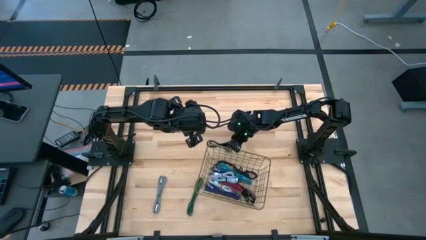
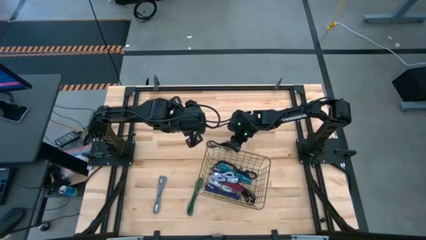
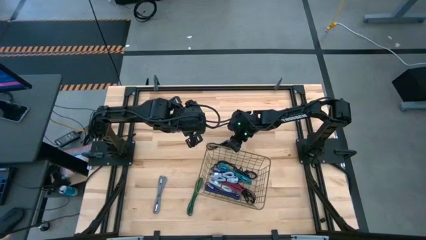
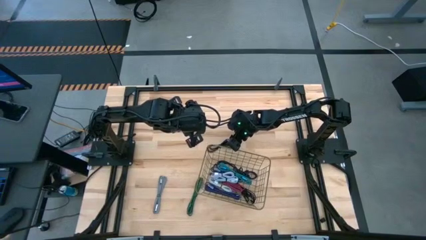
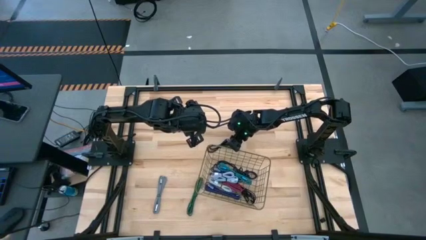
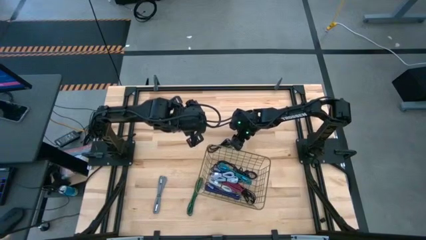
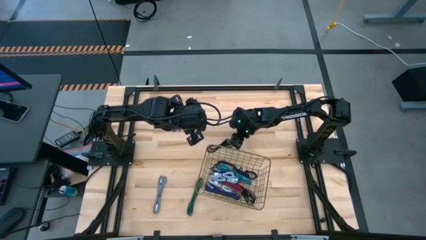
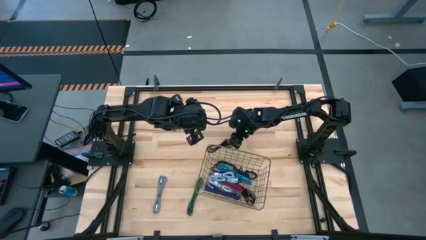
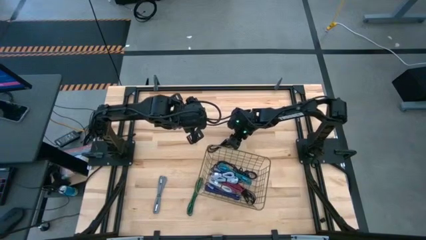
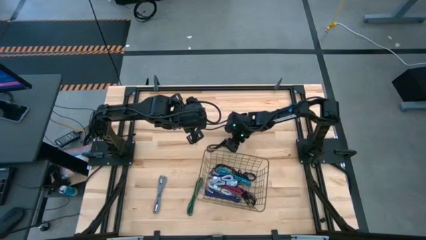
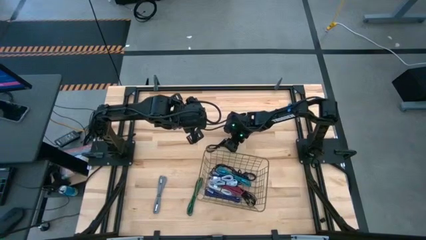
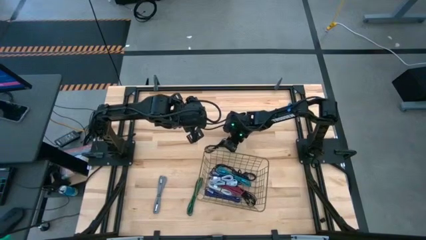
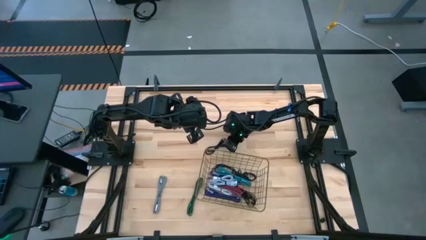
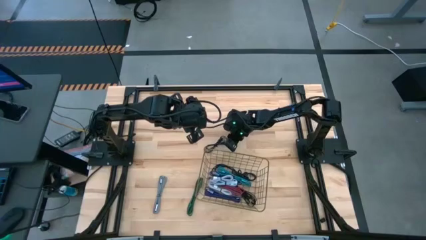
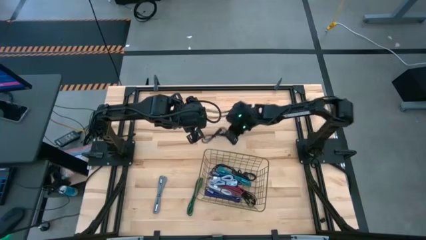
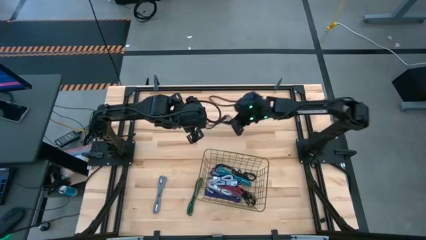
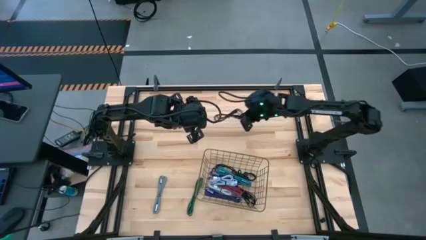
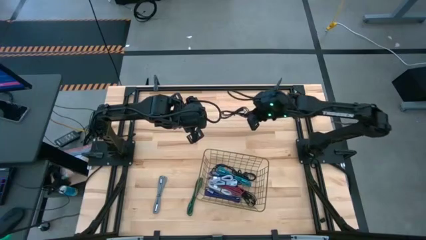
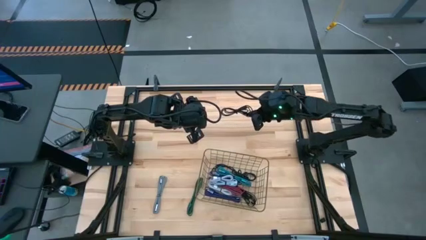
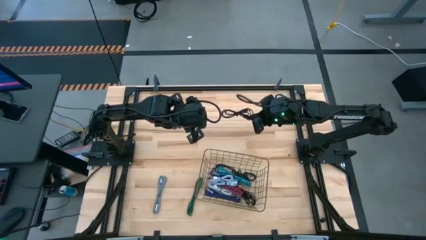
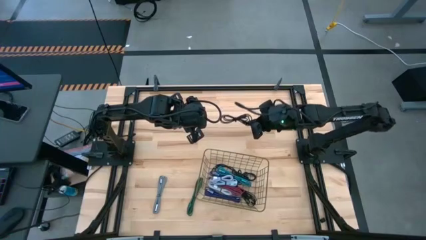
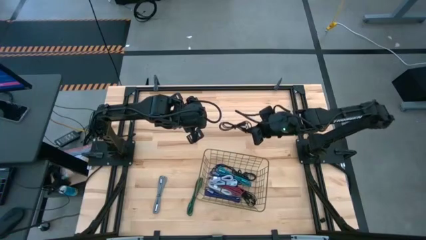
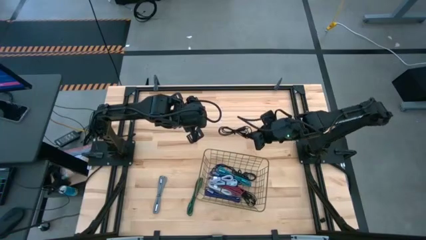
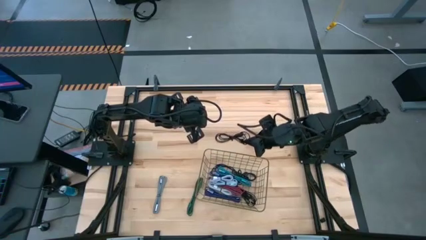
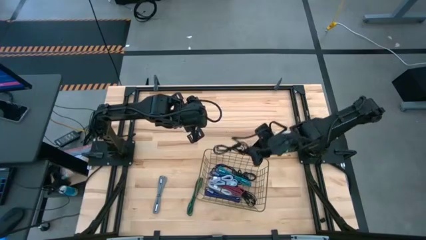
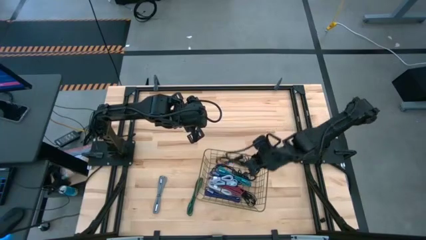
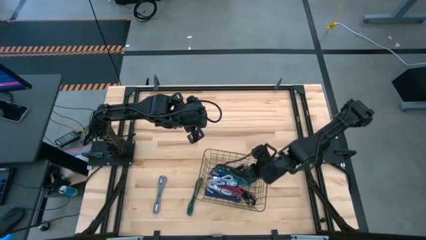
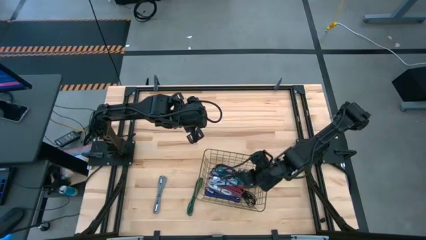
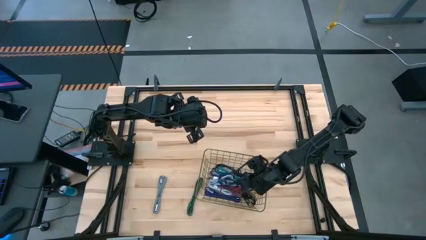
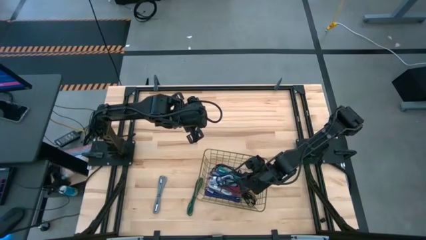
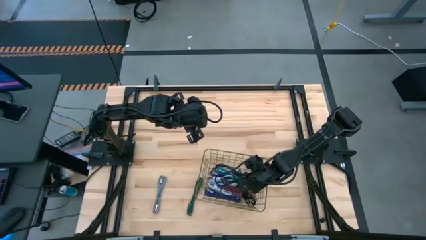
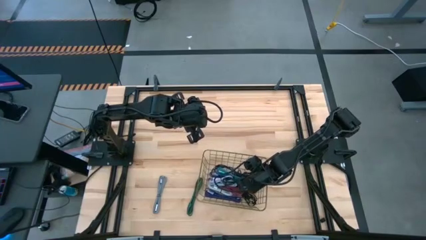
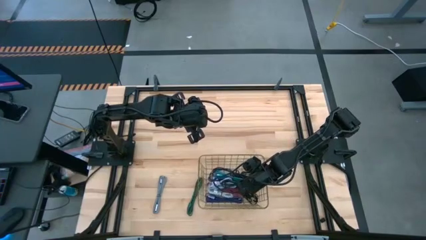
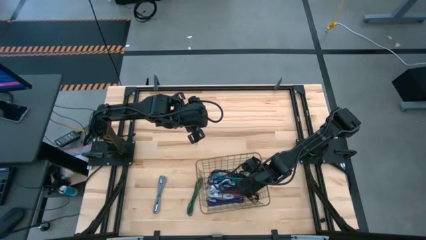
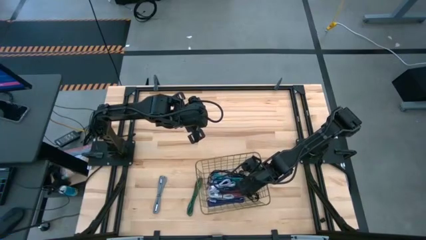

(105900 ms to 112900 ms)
Task: Pick and place USB-C Cables
Put the black charger cable into the wire basket

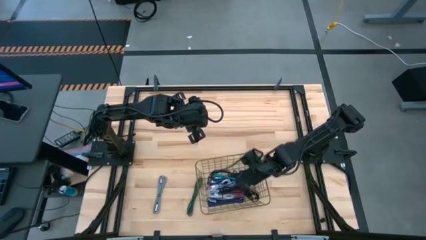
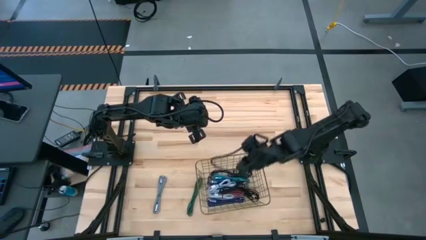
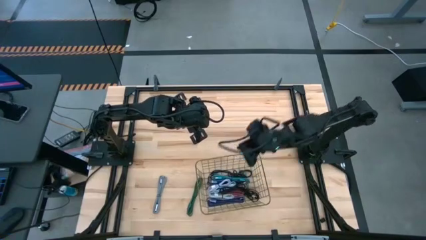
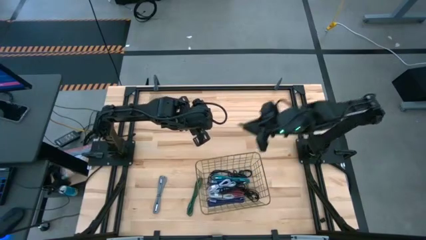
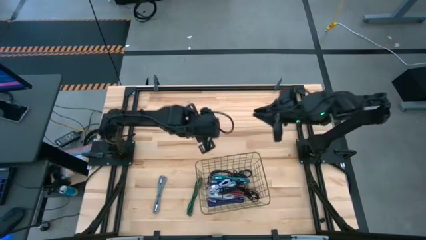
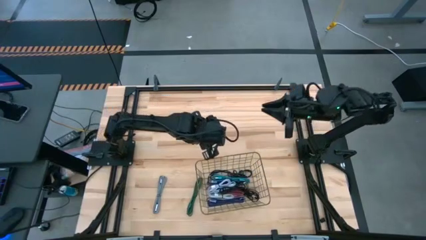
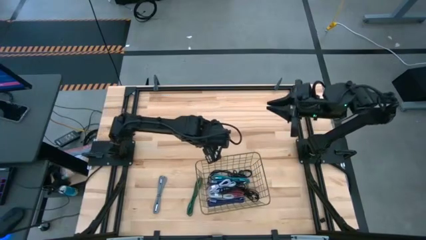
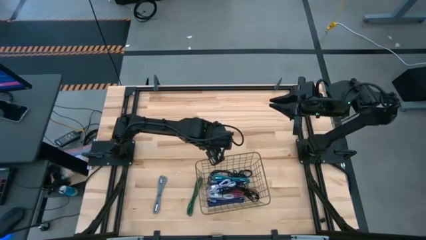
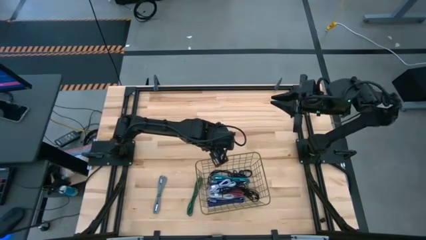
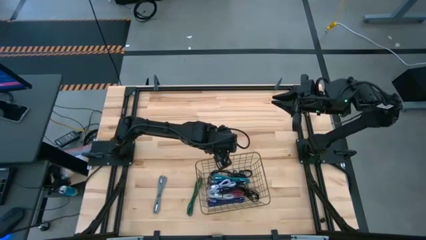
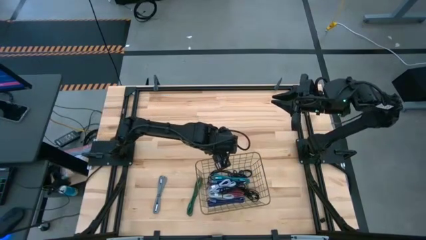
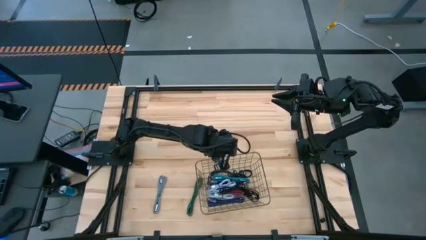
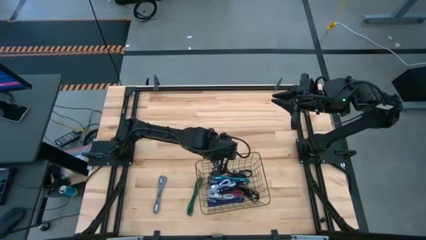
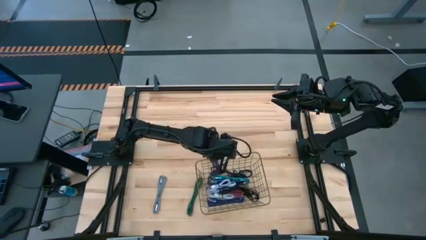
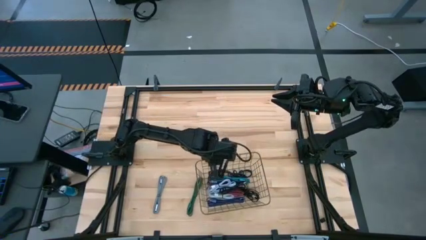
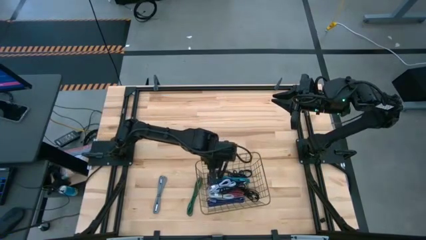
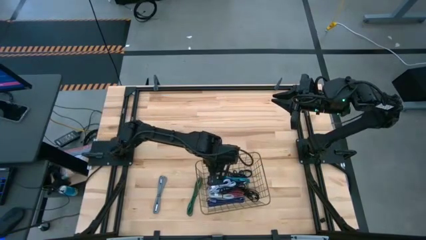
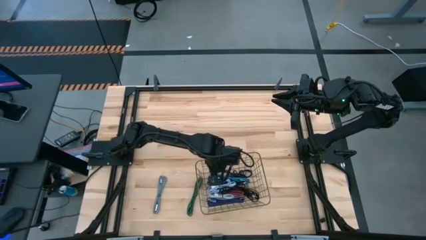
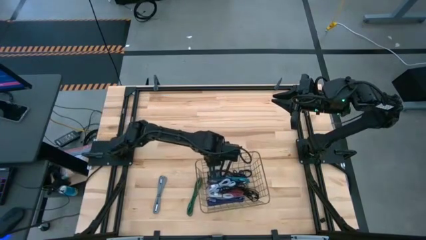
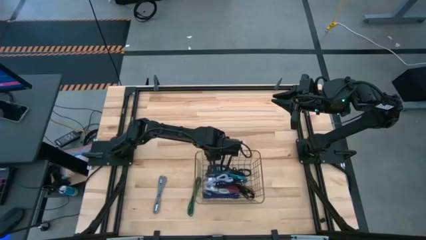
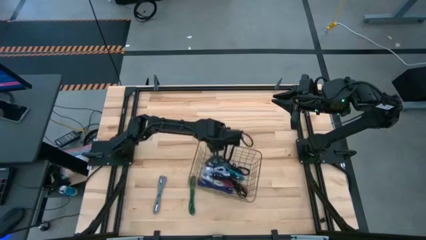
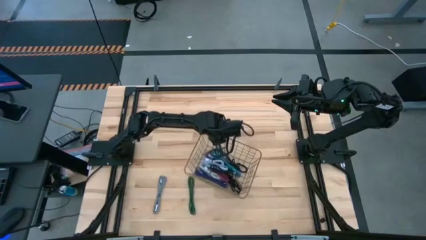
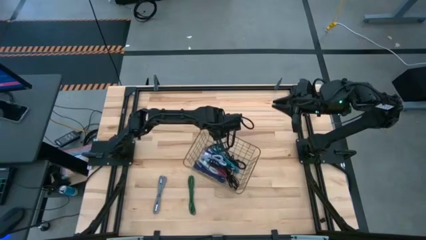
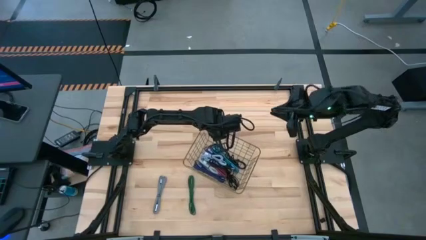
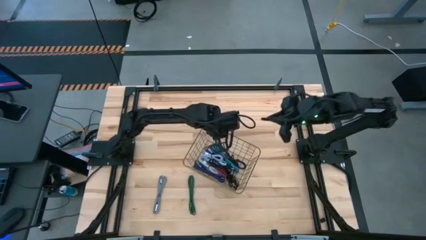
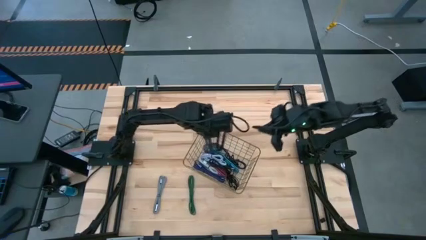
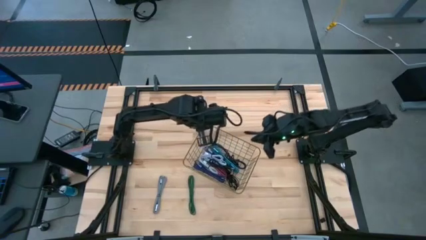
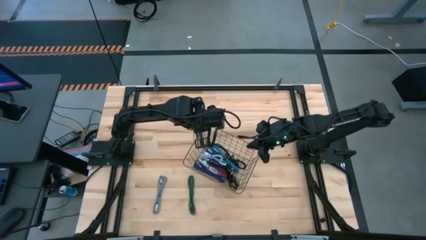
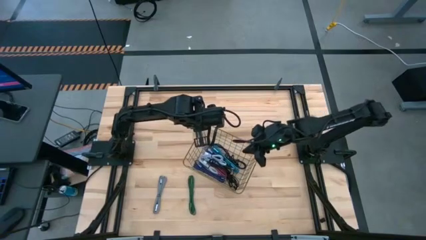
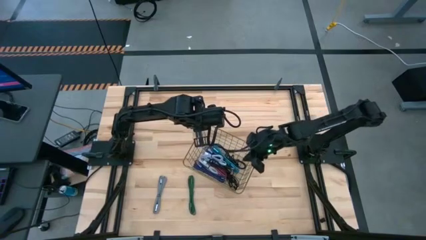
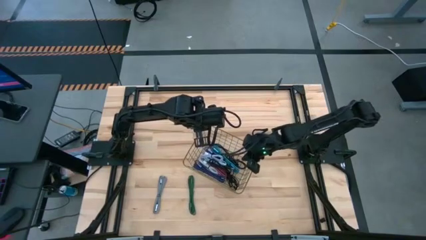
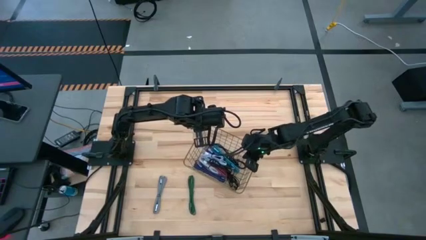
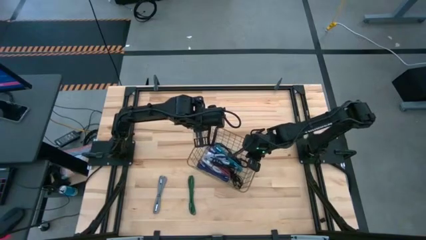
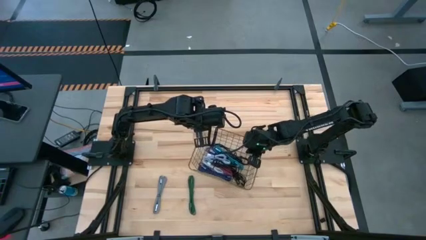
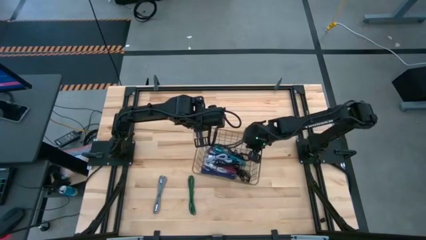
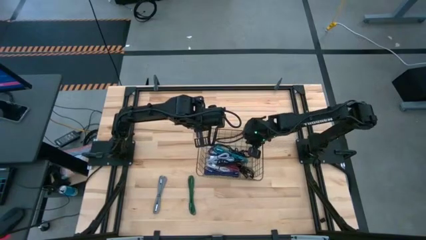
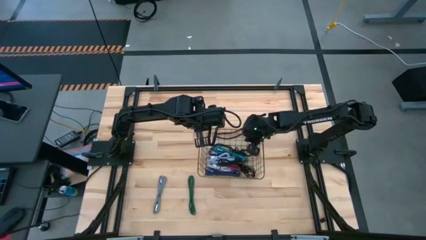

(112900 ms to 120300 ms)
Move the wire basket to the middle of the table
